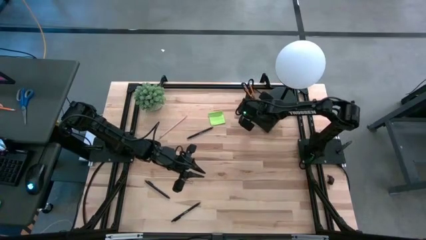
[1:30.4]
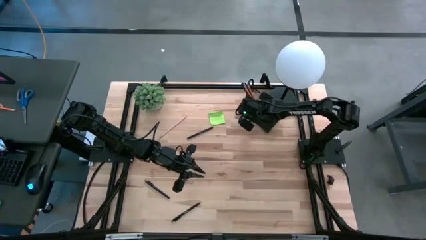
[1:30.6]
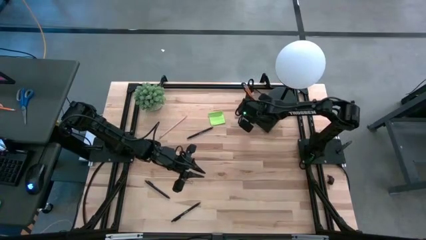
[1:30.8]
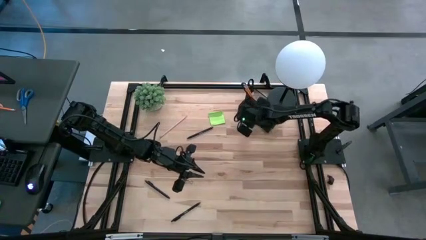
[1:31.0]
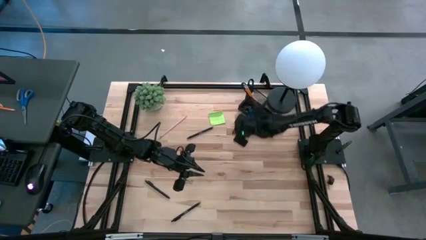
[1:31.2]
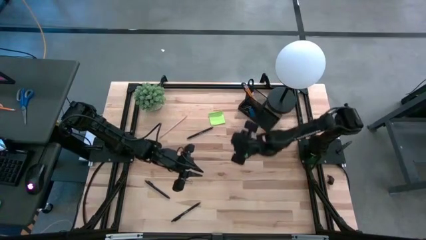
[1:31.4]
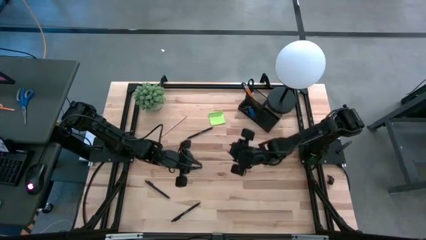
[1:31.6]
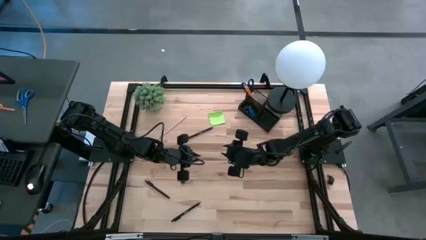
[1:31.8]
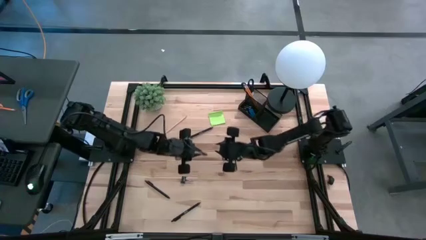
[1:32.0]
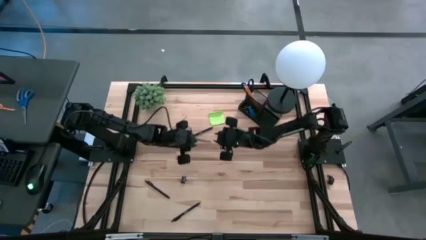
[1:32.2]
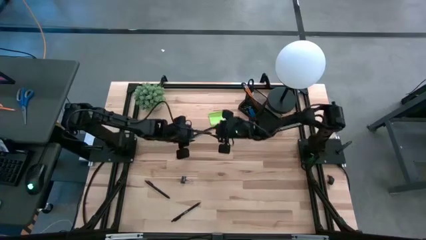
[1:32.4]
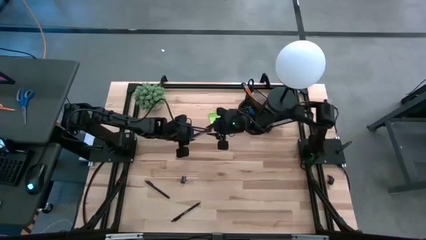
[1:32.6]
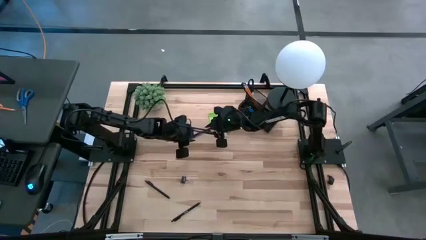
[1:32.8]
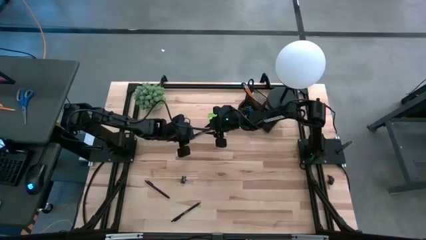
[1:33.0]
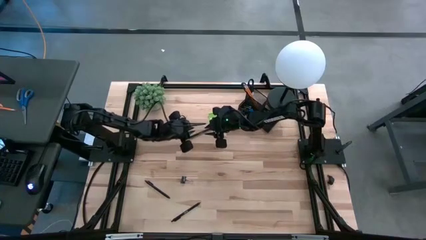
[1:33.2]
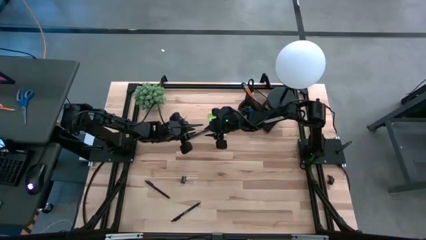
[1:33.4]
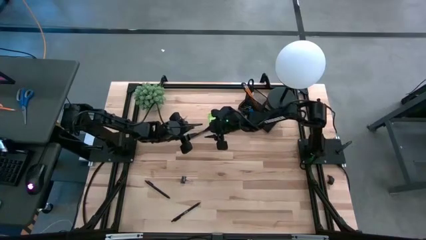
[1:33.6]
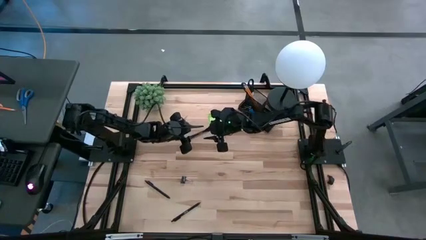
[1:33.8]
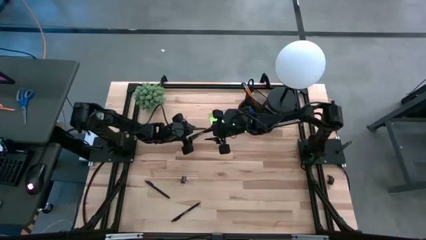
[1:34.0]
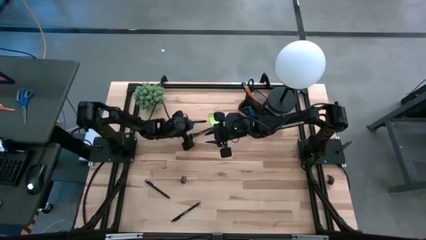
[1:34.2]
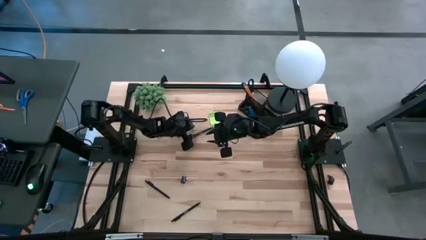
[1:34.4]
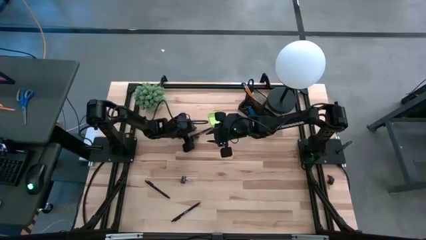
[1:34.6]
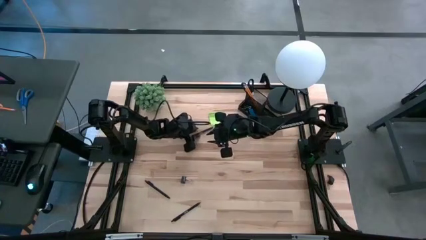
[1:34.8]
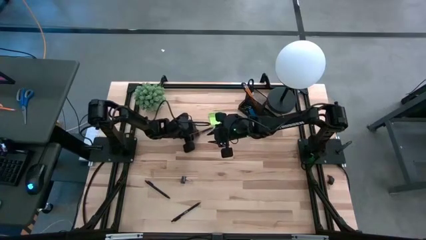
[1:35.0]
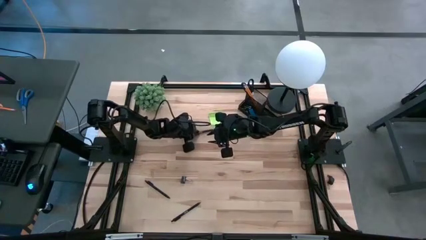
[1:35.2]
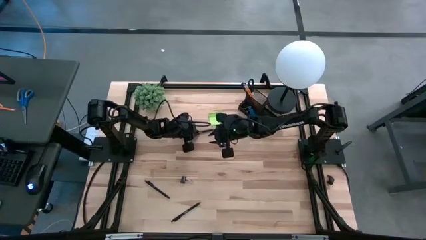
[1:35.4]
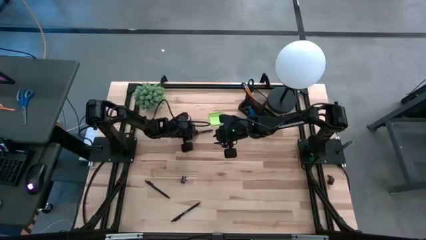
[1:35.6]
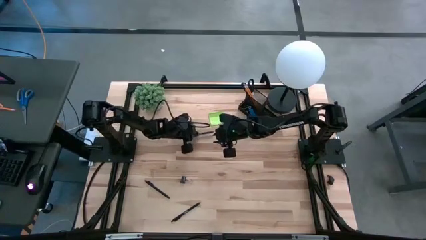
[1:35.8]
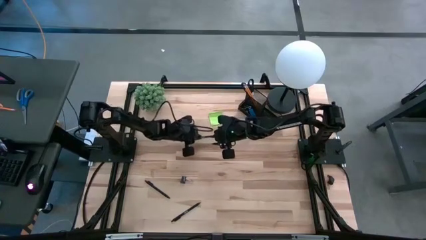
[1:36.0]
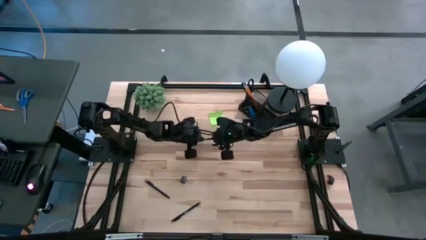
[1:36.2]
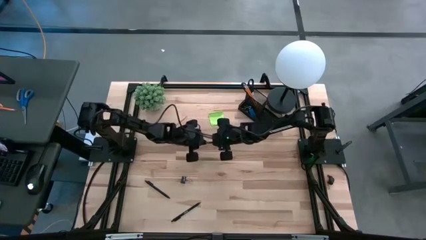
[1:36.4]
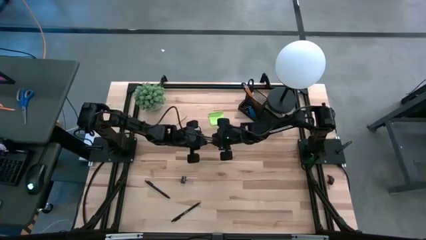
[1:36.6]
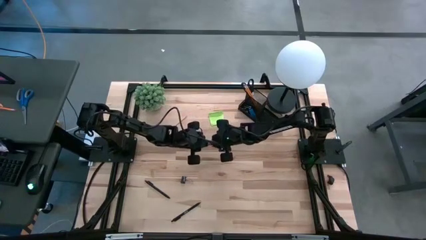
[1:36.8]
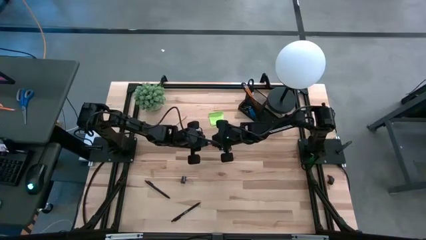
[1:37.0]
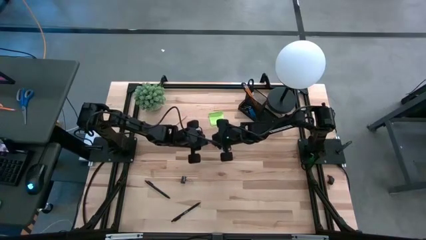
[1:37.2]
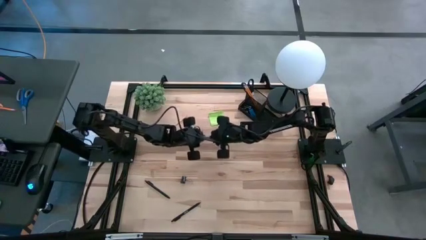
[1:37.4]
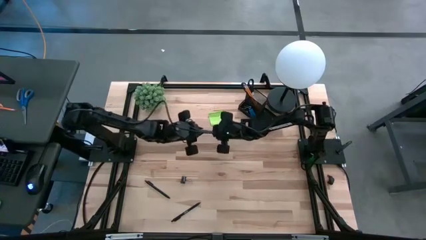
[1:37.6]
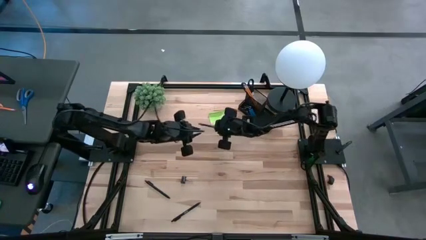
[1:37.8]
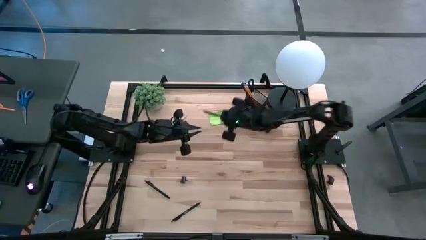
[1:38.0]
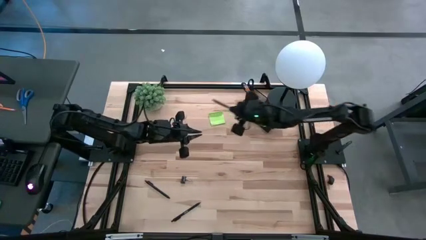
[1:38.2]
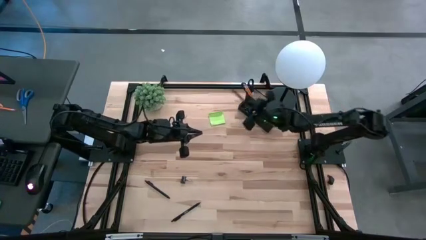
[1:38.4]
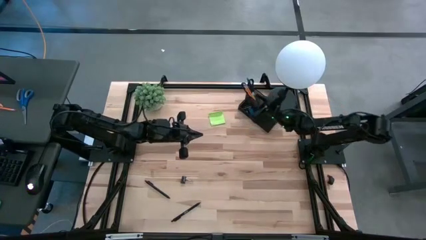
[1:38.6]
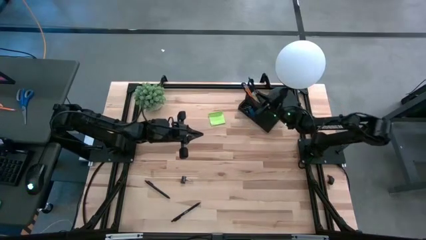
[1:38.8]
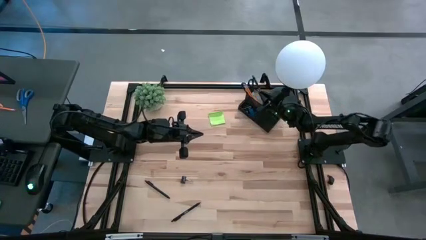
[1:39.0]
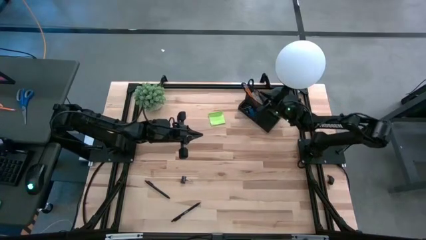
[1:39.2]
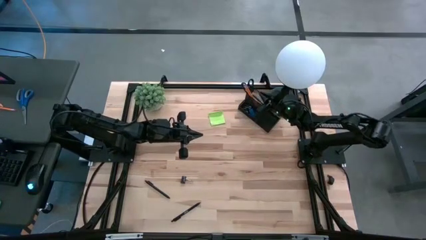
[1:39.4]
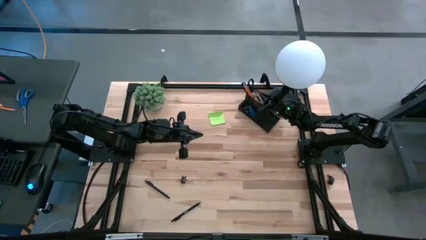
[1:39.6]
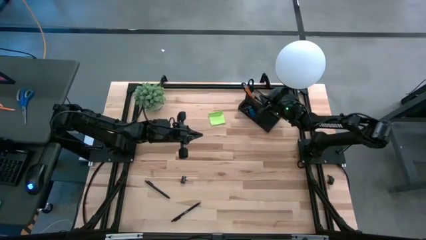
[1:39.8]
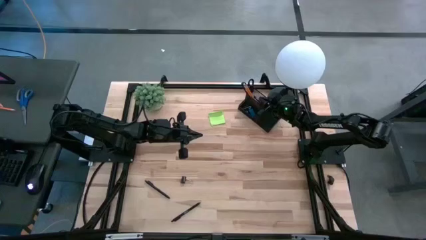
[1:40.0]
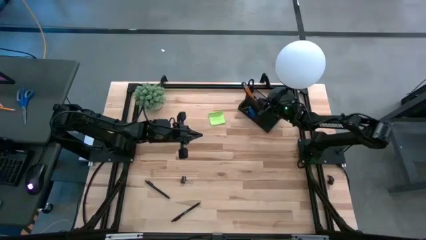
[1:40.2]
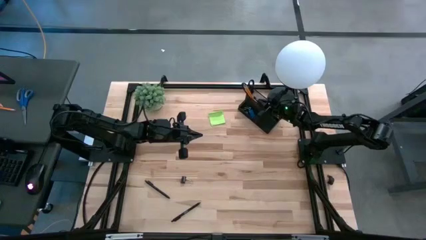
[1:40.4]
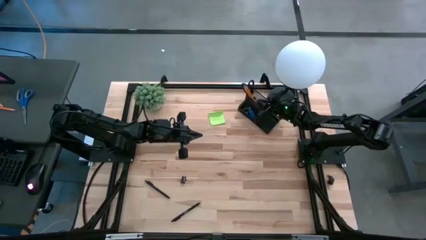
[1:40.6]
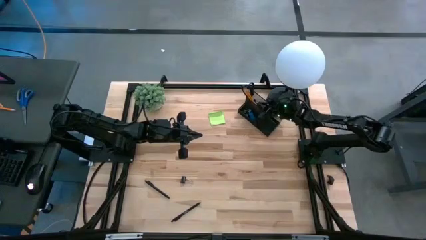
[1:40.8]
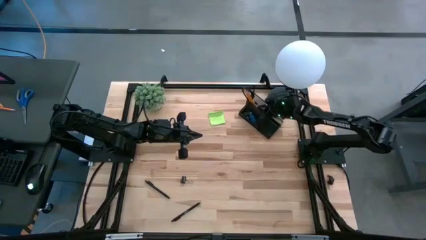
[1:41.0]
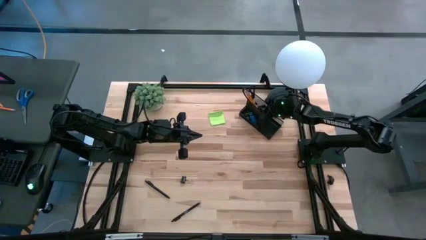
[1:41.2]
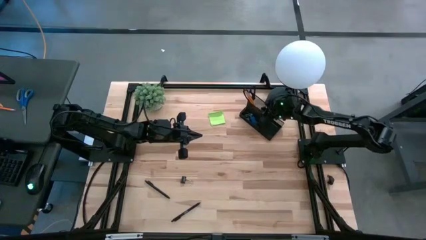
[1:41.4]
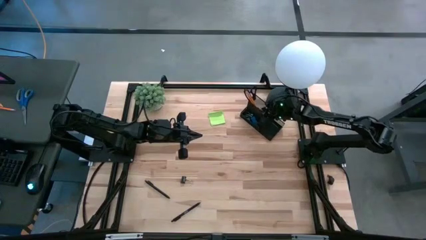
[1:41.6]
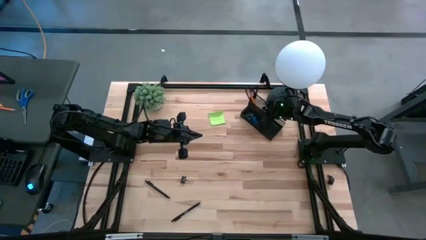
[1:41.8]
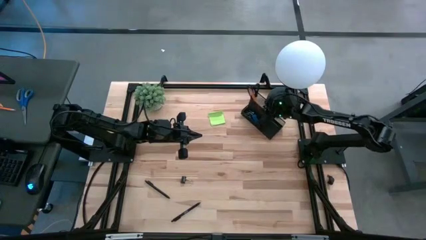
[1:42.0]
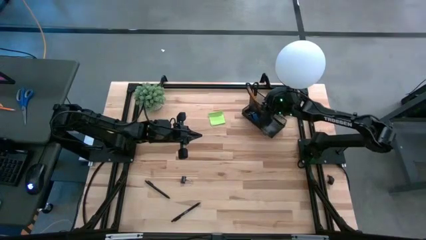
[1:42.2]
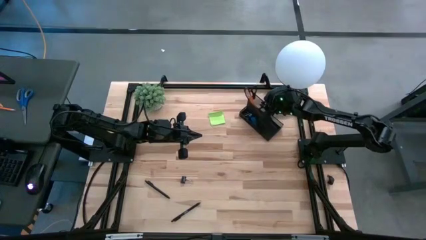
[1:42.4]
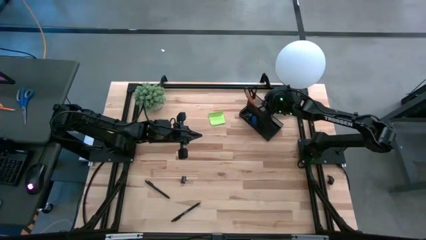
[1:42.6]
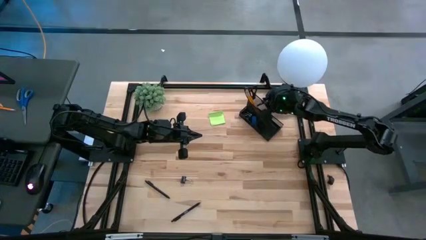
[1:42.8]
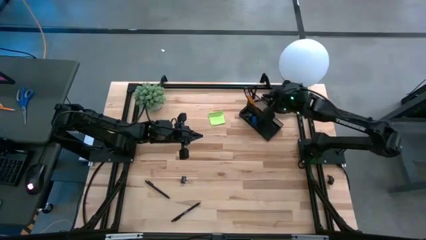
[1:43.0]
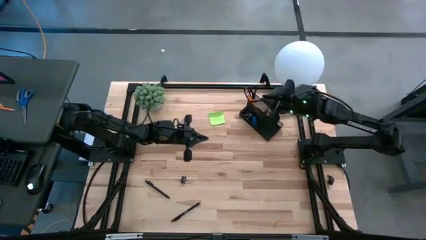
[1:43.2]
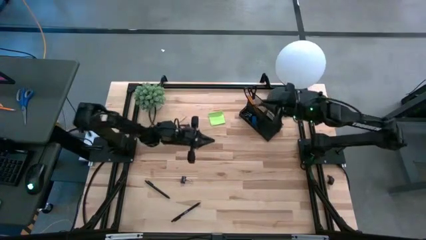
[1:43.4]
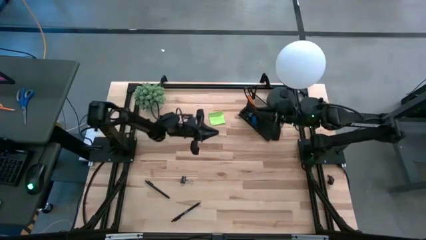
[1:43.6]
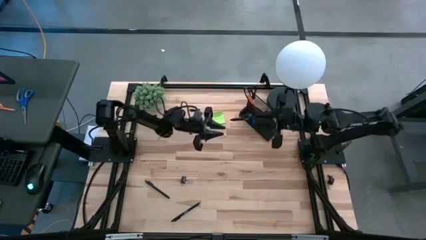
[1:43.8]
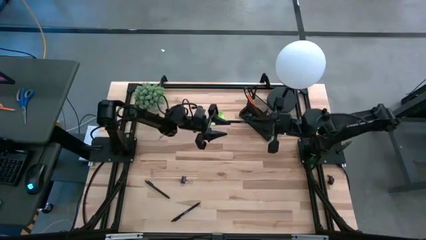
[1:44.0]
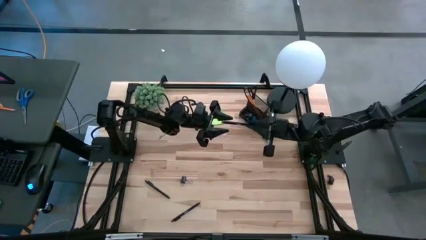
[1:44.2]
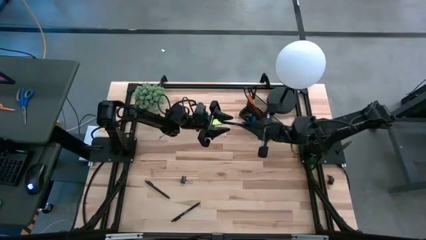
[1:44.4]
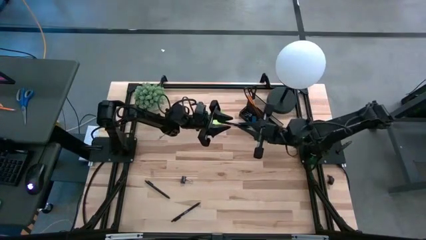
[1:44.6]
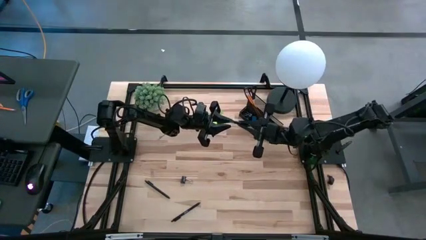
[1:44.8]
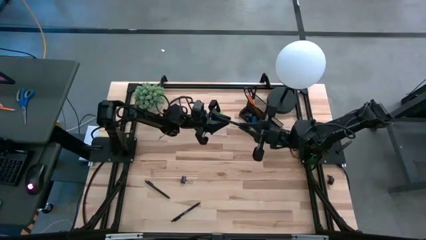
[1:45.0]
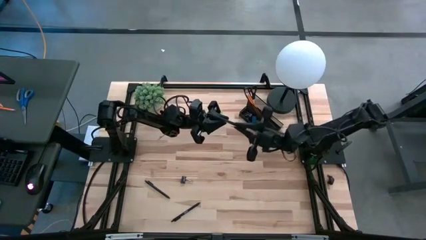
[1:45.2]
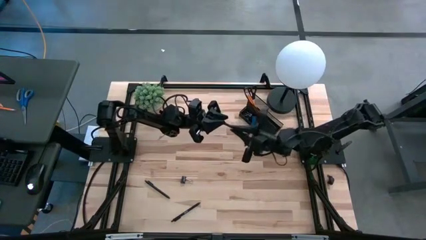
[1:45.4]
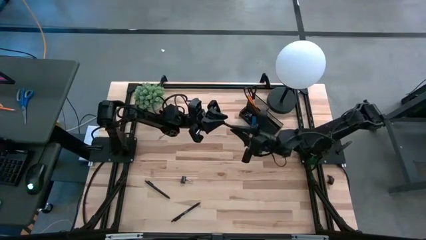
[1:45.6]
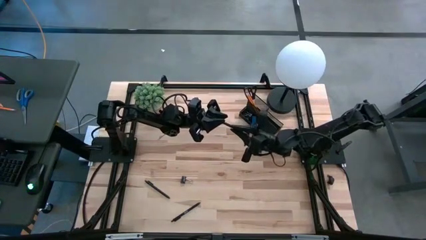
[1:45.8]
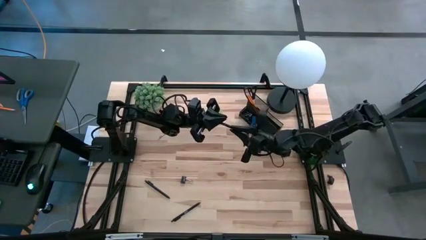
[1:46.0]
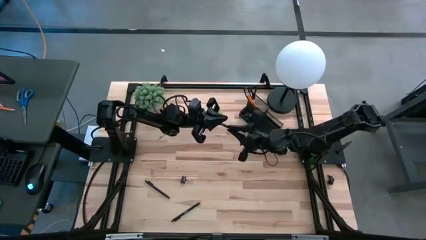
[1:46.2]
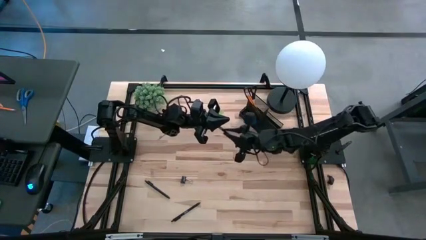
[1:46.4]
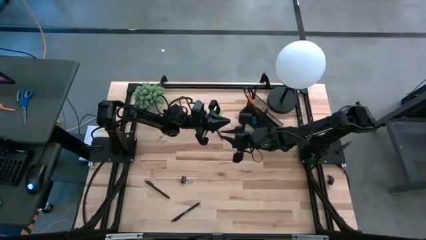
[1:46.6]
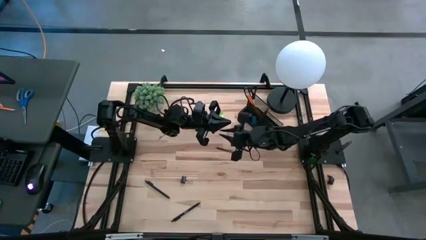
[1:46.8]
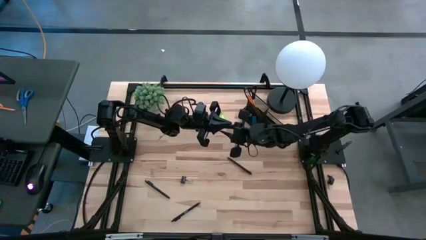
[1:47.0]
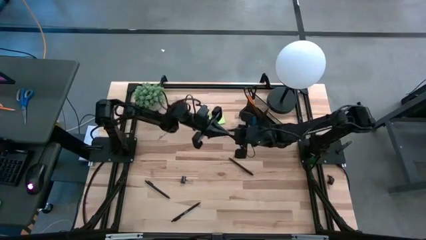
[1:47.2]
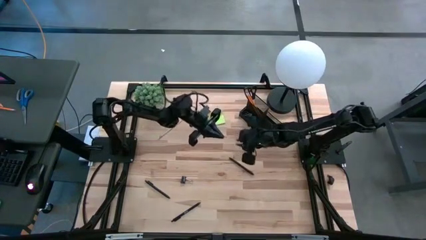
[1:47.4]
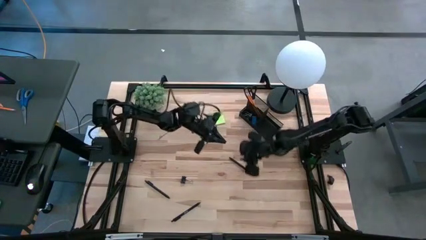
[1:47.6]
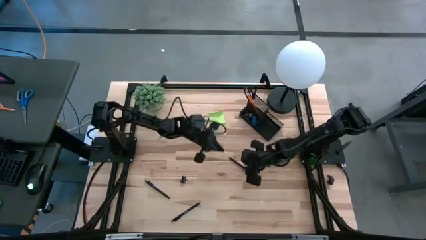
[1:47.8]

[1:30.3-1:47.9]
Task: Pick and place office supplies into organizer
Put the black pen into the black desk organizer
